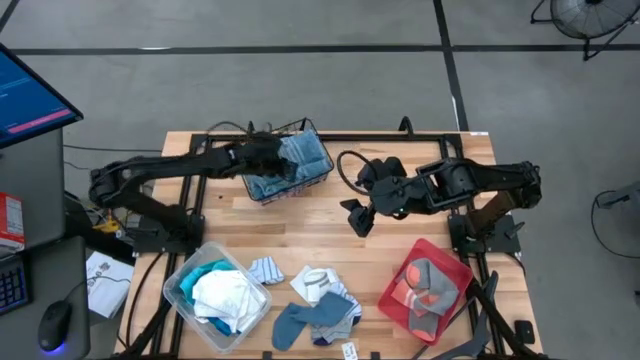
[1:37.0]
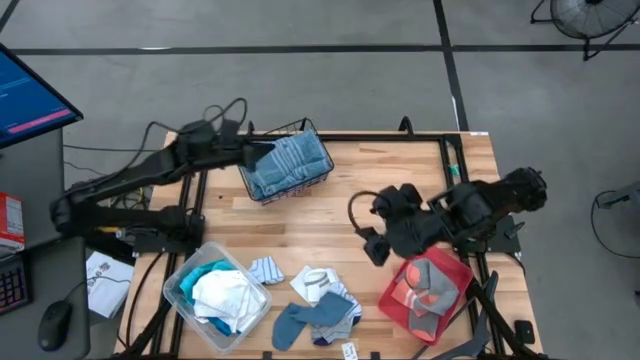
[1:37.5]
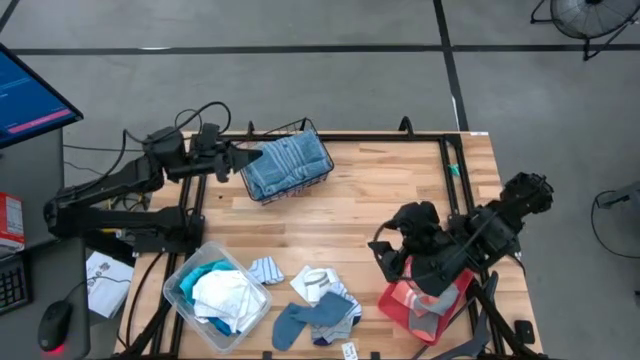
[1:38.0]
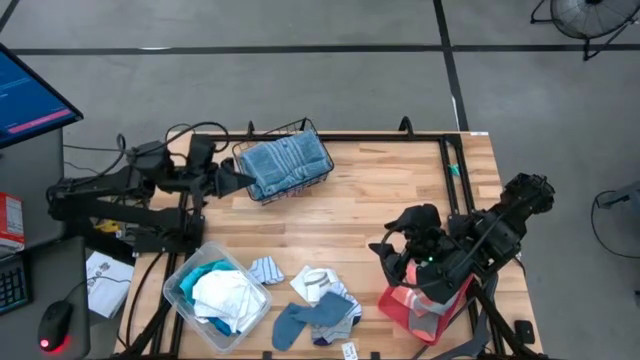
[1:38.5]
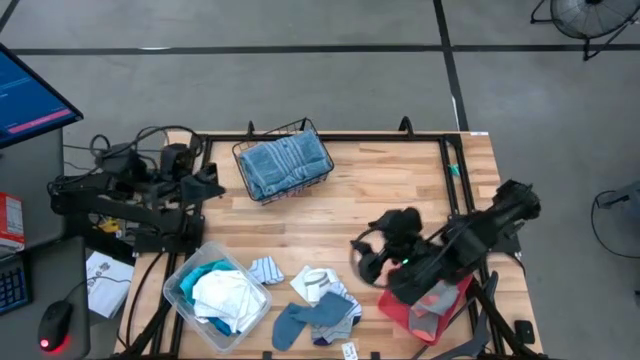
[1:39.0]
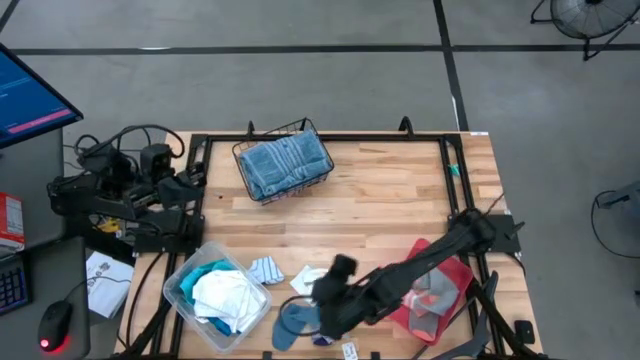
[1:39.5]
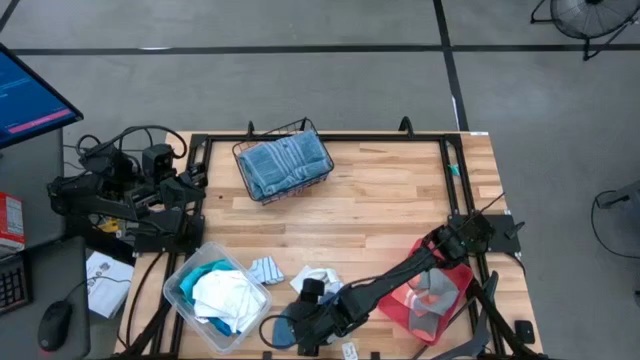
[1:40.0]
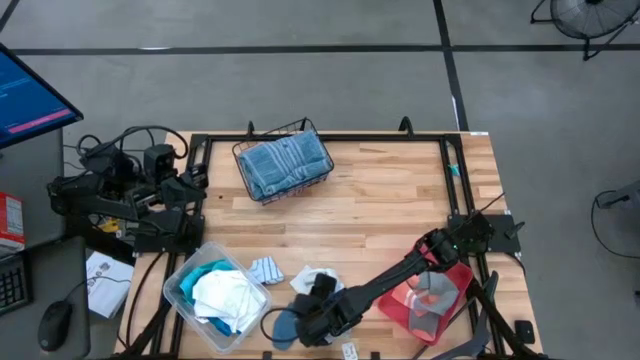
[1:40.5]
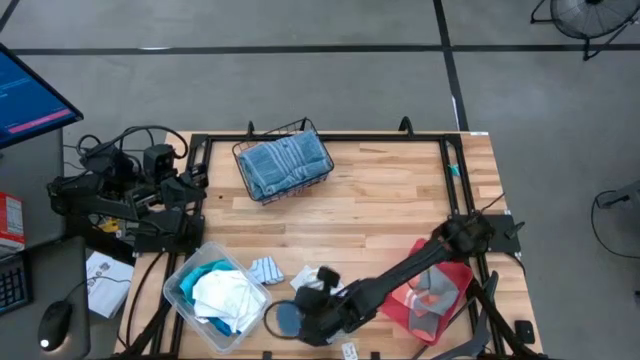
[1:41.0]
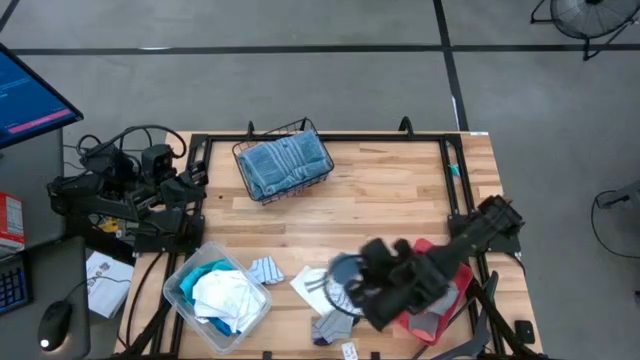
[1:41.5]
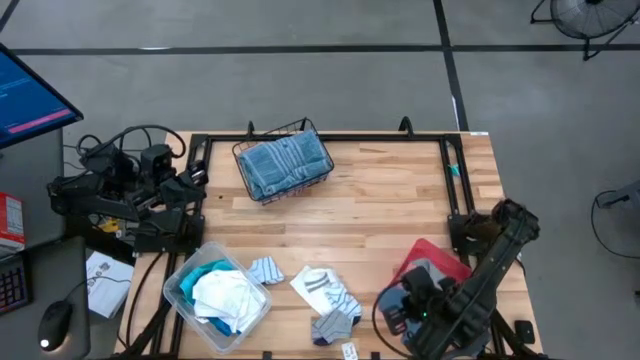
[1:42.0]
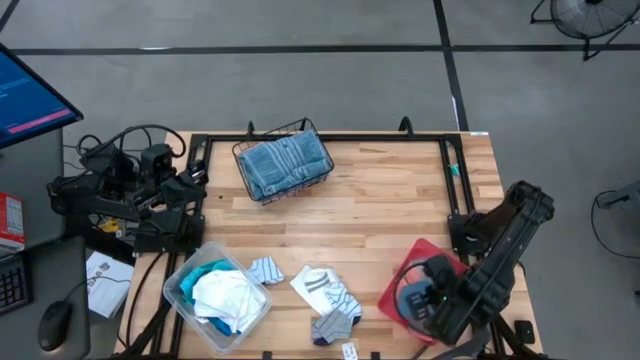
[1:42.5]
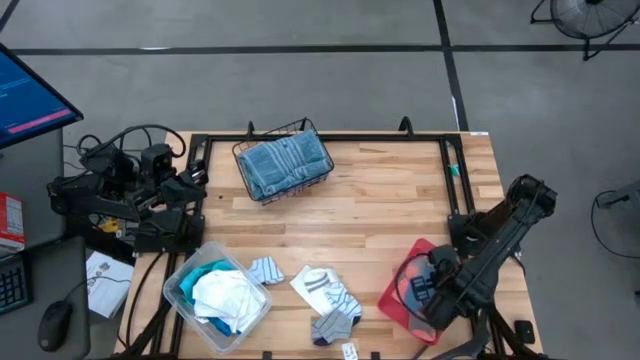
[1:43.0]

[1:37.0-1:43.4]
Task: Pick & Place Cloths
Put the blue sock into the red bin

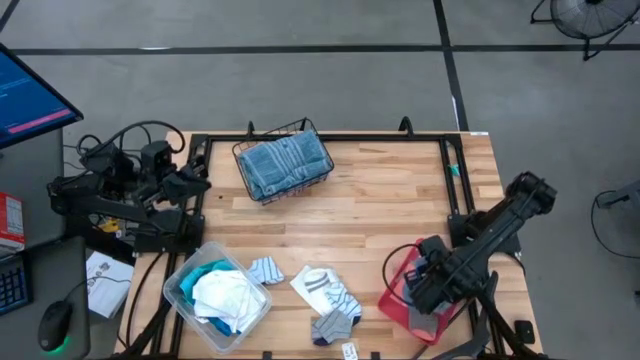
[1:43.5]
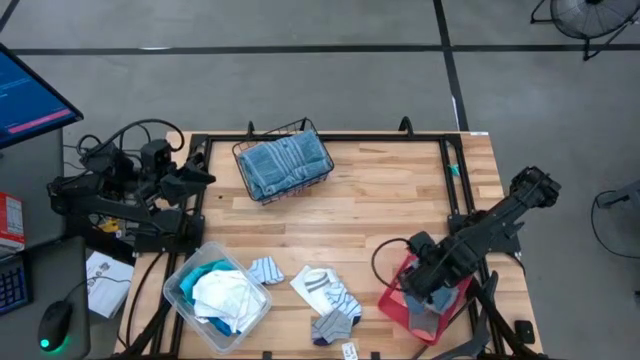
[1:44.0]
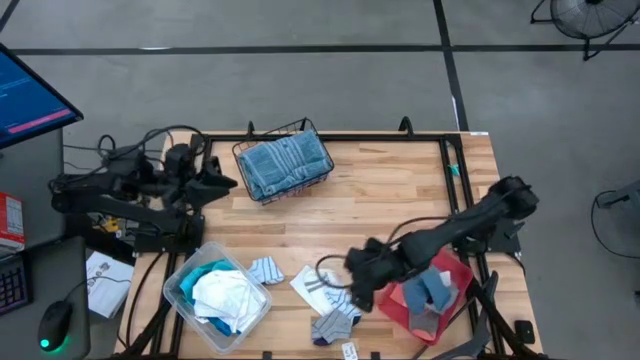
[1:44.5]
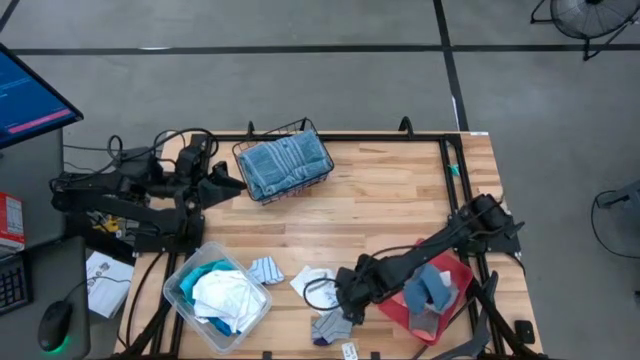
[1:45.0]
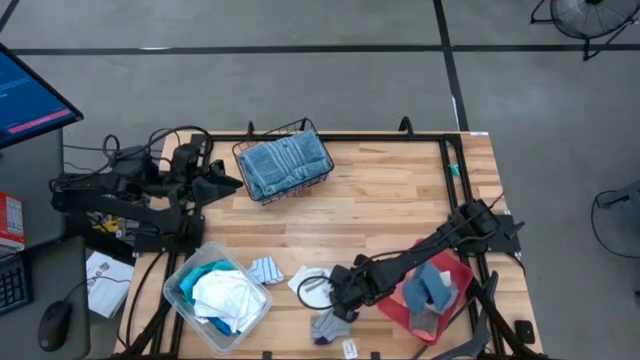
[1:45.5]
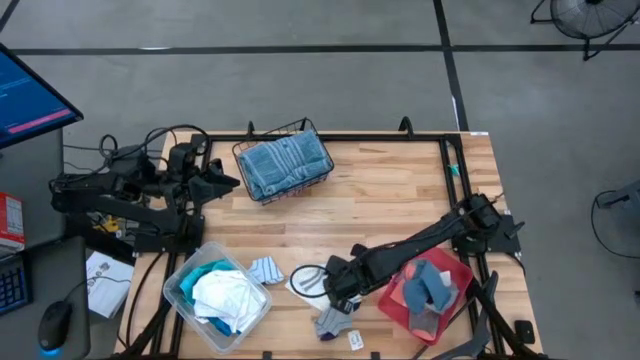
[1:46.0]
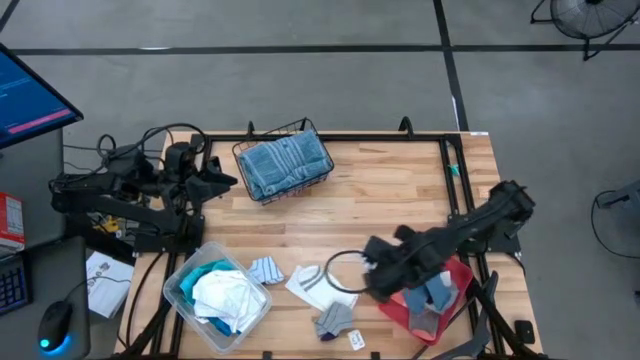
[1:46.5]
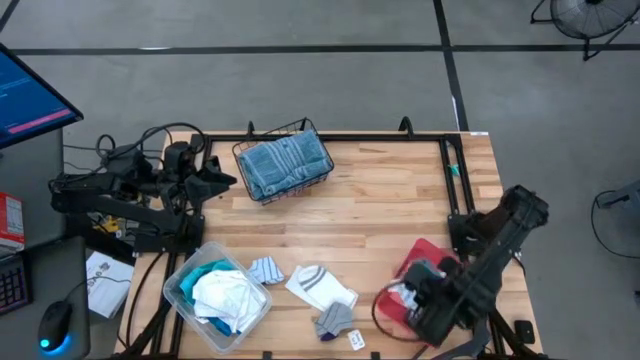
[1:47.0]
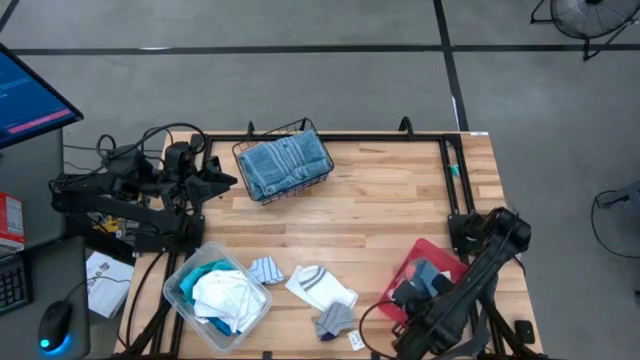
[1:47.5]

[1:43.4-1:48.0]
Put the bottom white patterned sock into the red bin

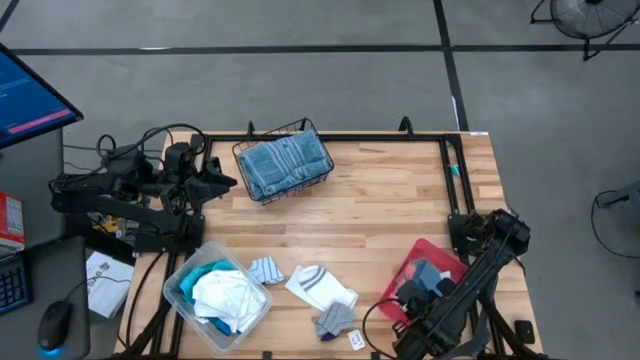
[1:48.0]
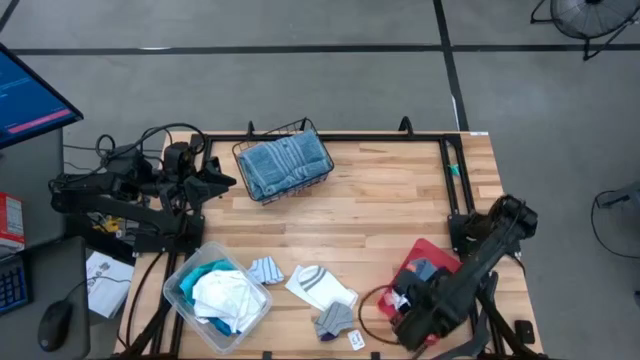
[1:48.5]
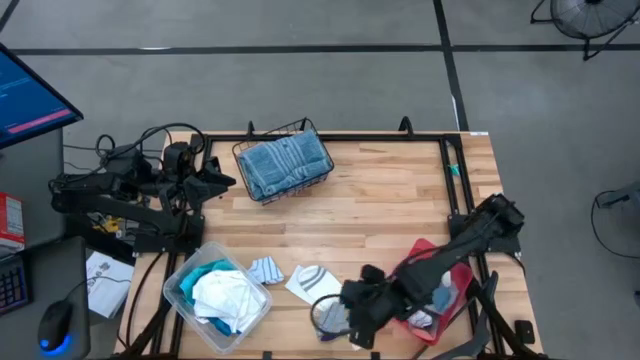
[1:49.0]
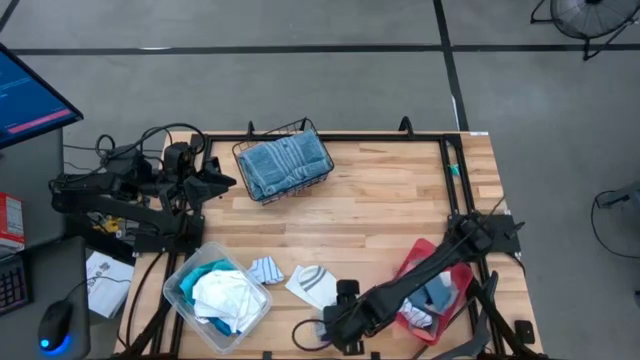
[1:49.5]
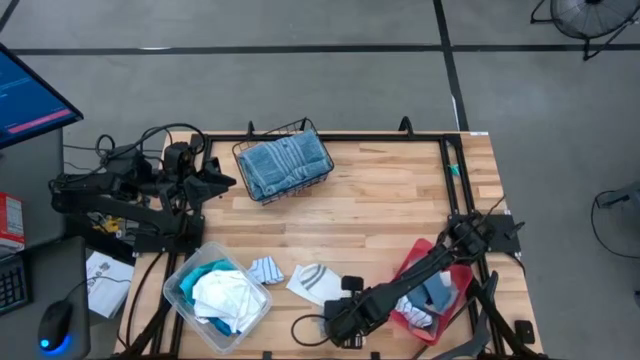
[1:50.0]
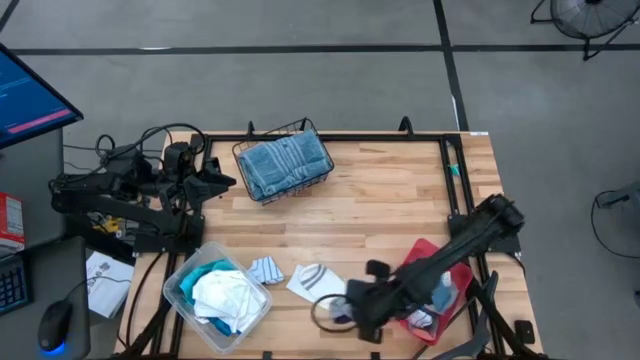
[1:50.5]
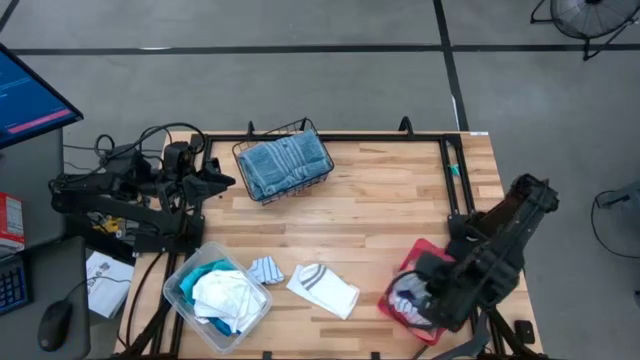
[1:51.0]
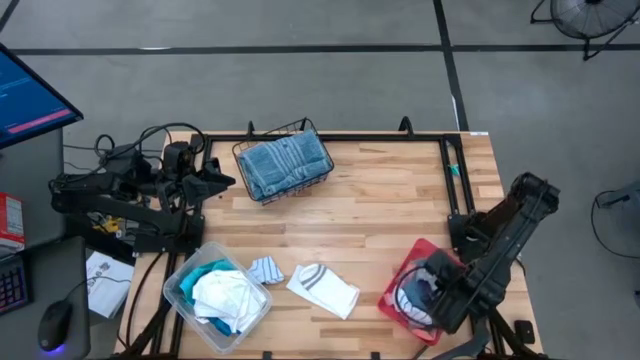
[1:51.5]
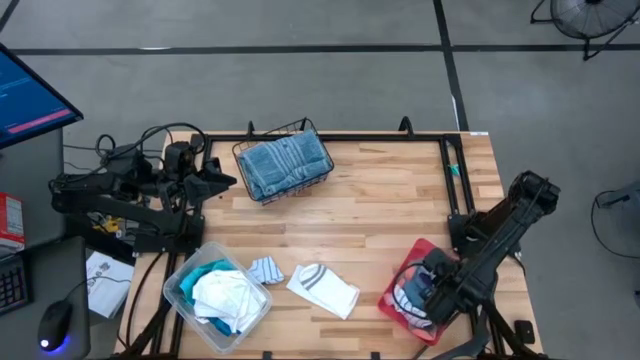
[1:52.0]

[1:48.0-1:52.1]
Put the gray sock into the red bin

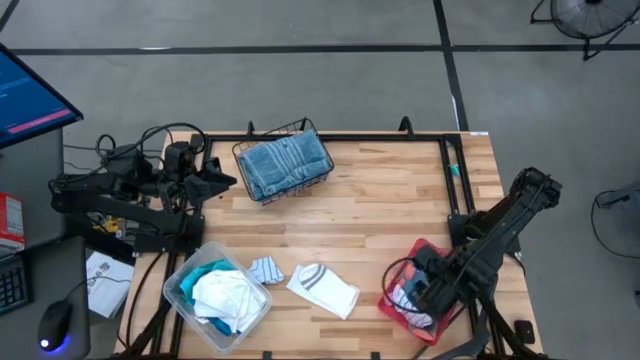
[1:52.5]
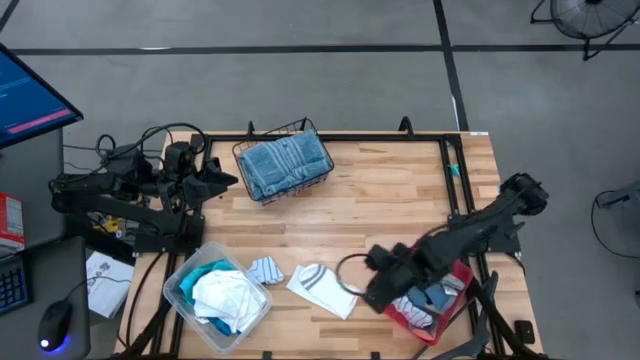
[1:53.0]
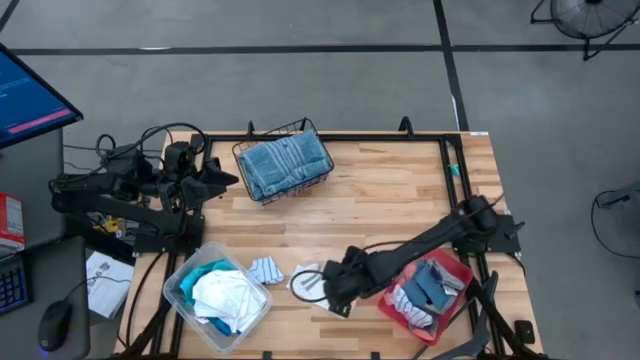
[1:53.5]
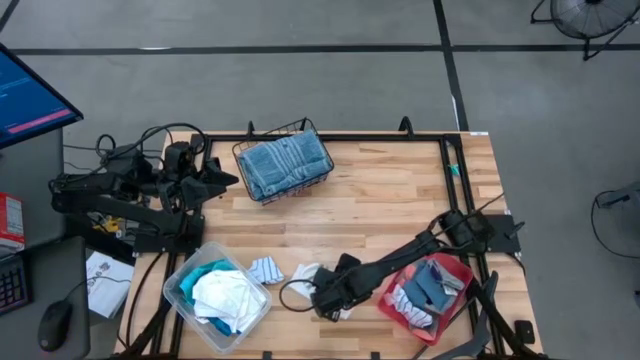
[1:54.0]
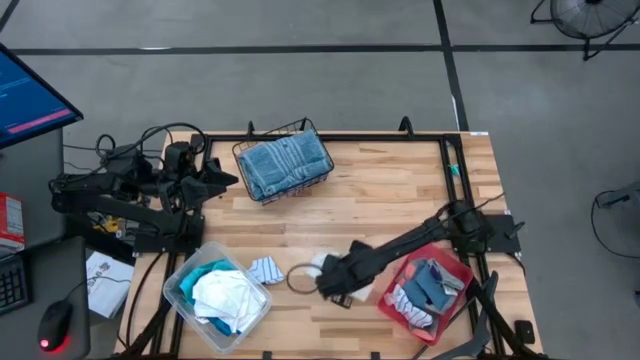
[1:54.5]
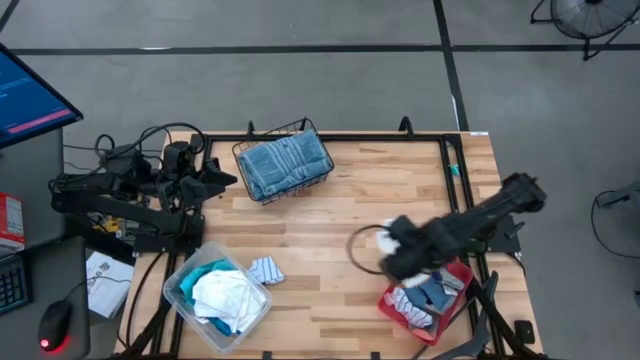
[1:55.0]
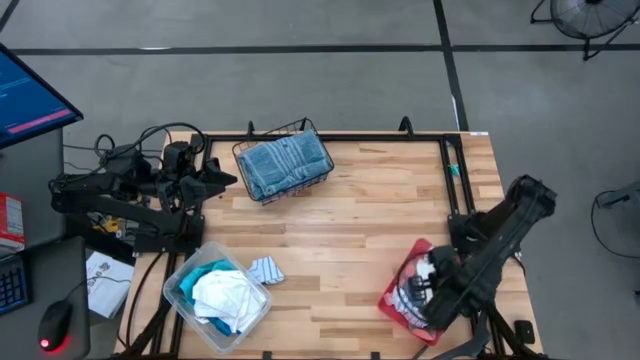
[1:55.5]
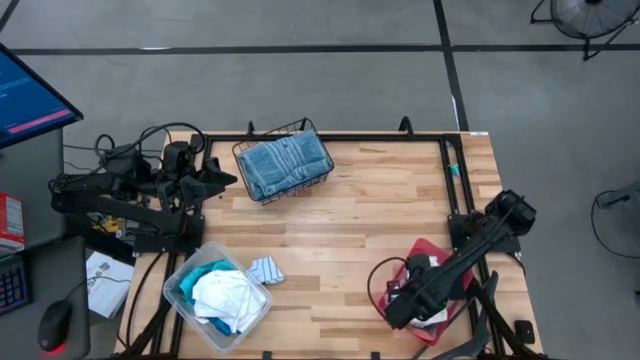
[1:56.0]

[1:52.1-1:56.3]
Put the white sock into the red bin

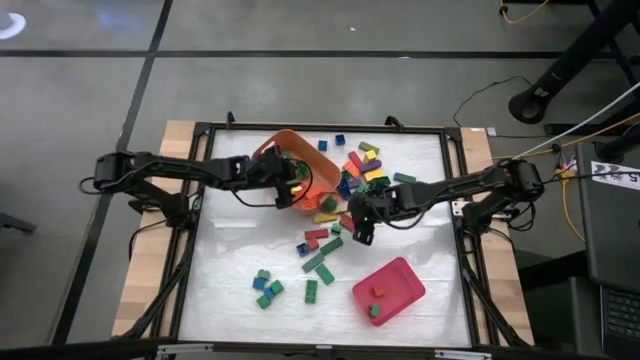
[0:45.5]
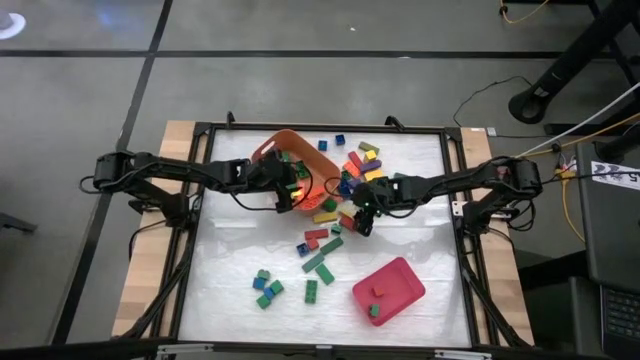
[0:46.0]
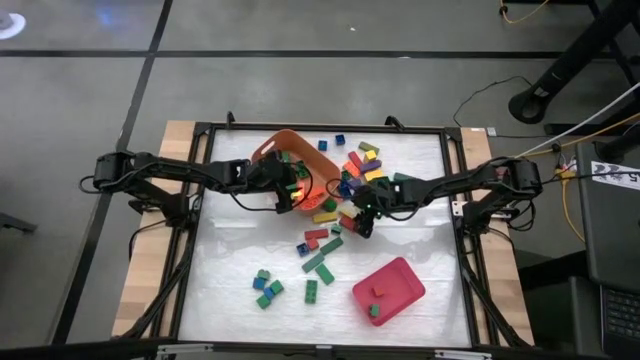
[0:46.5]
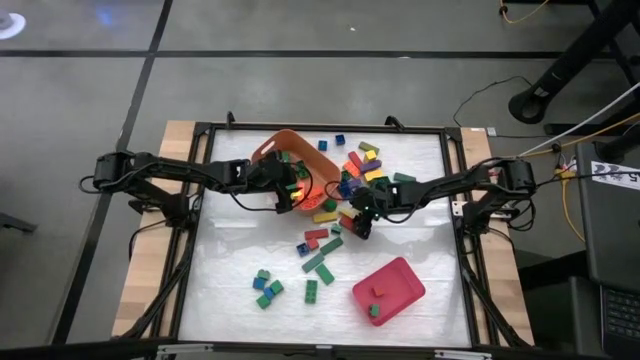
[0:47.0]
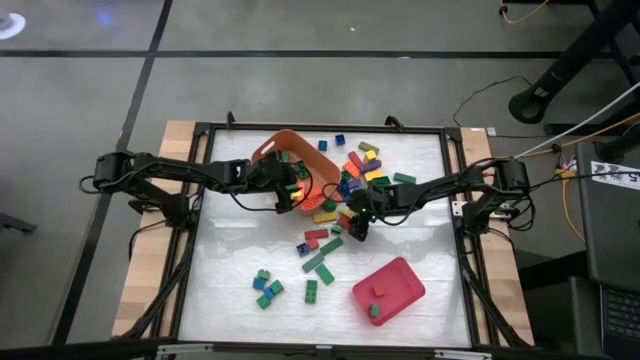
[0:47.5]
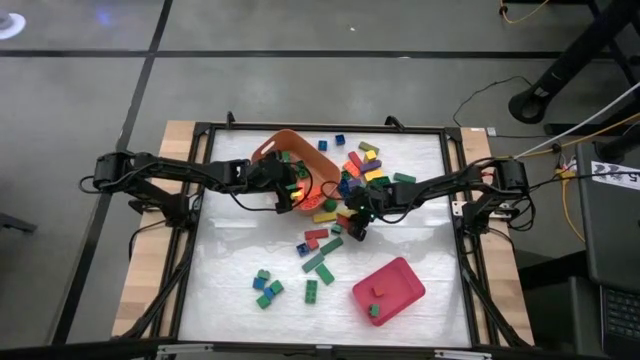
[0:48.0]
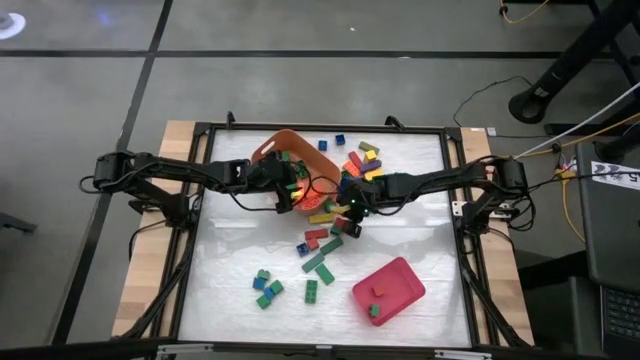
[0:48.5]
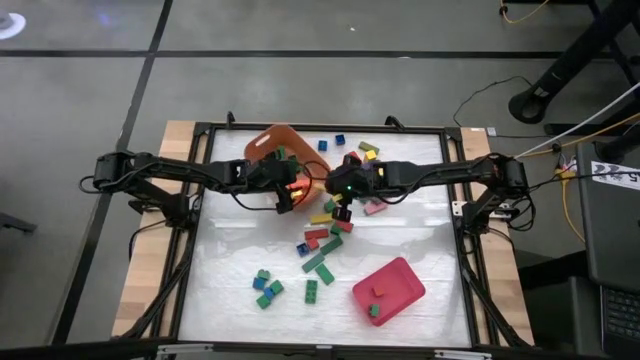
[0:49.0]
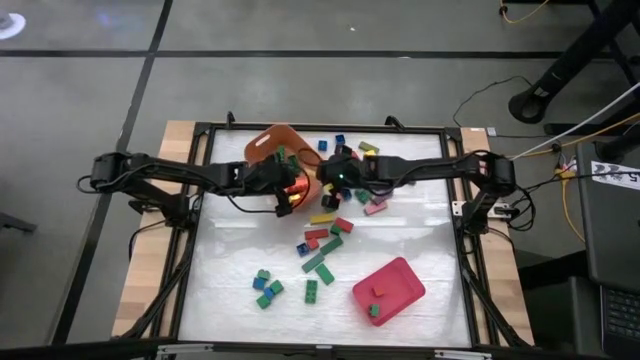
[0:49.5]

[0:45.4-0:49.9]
Task: Sort blocks by size
Put the large yellow block into the orange bin
